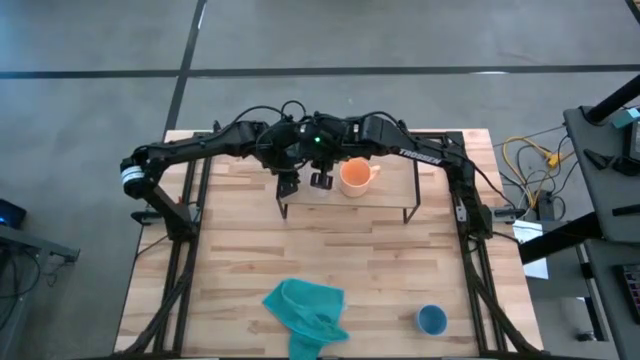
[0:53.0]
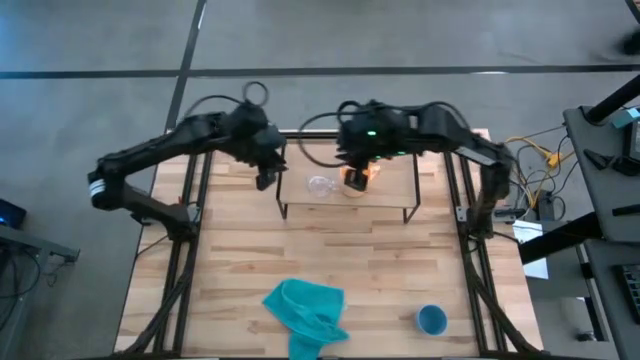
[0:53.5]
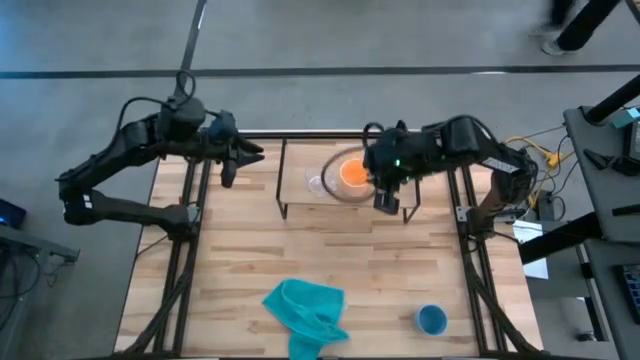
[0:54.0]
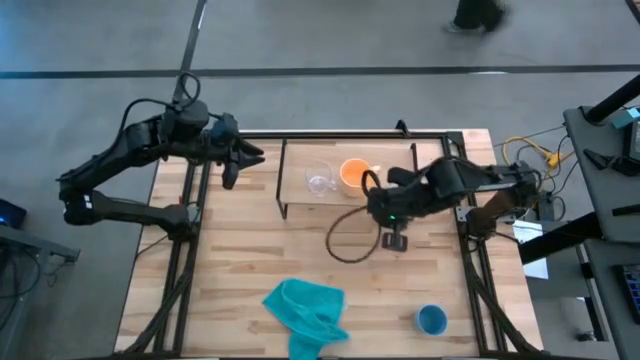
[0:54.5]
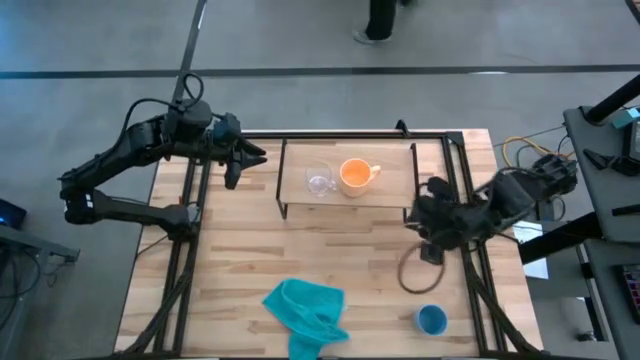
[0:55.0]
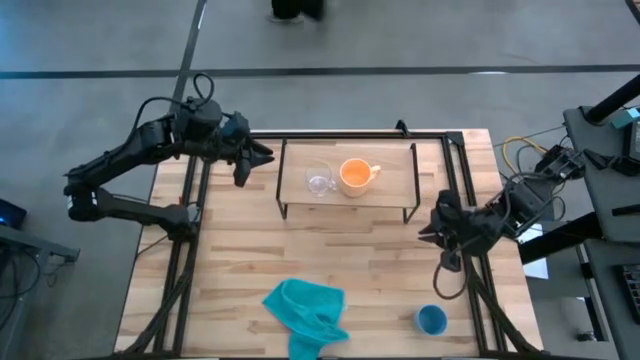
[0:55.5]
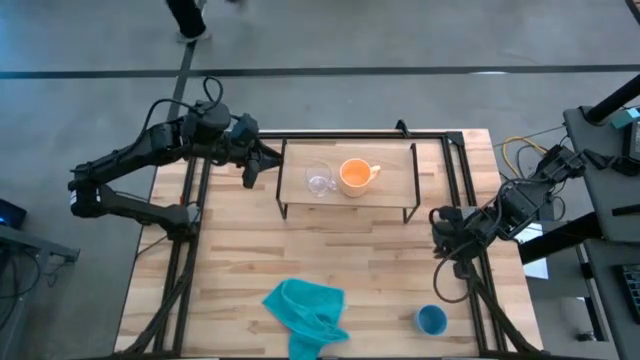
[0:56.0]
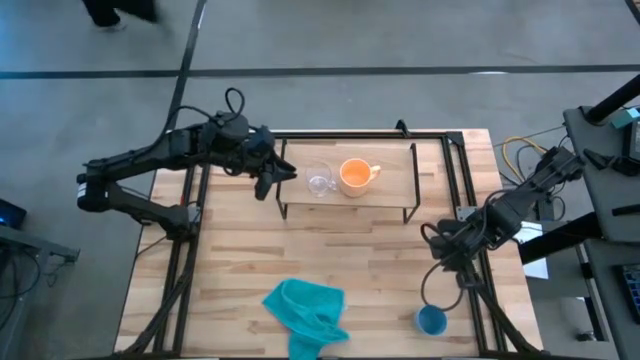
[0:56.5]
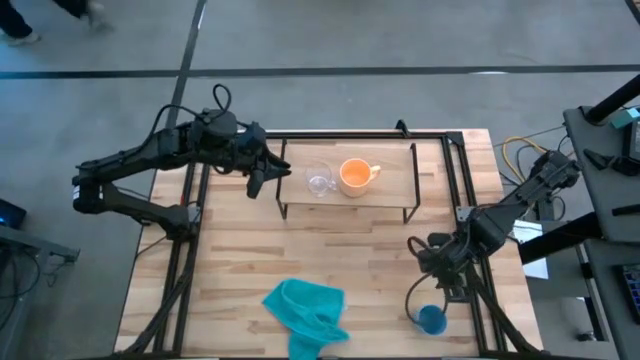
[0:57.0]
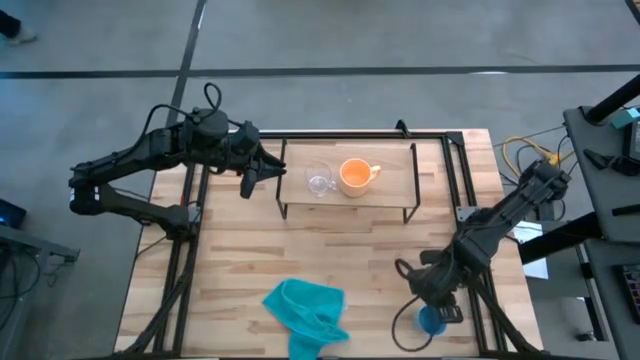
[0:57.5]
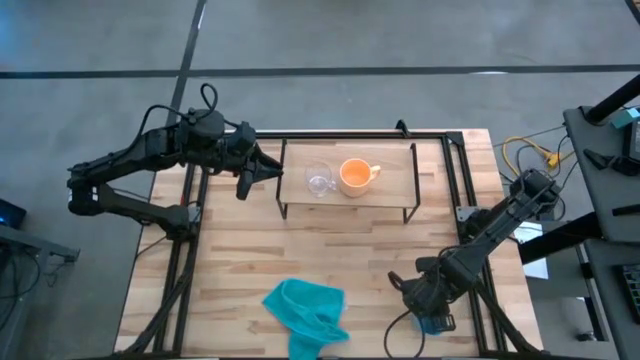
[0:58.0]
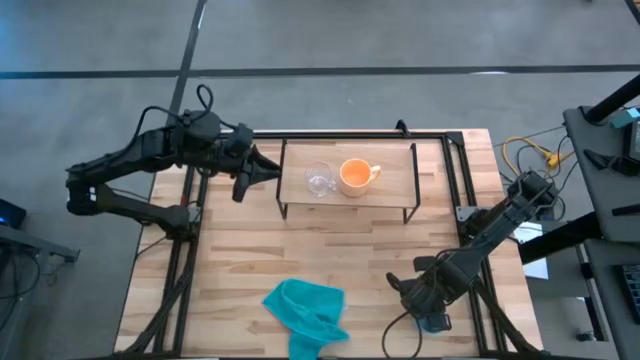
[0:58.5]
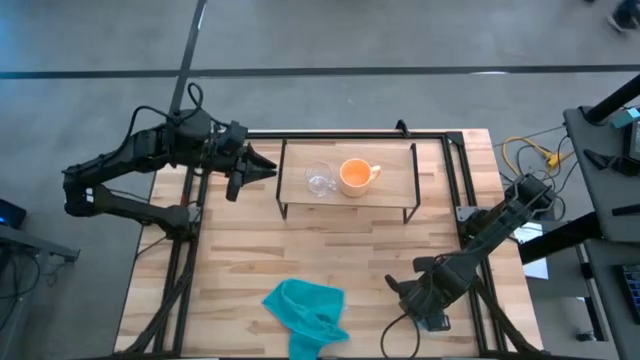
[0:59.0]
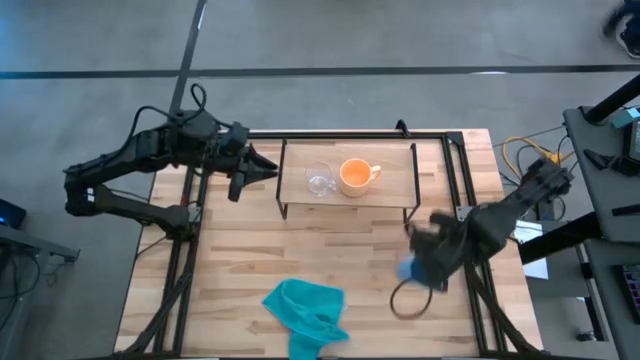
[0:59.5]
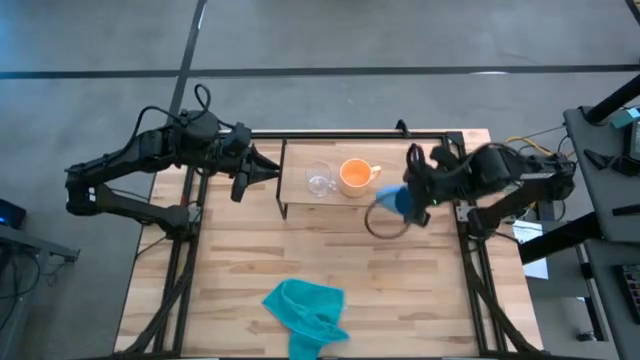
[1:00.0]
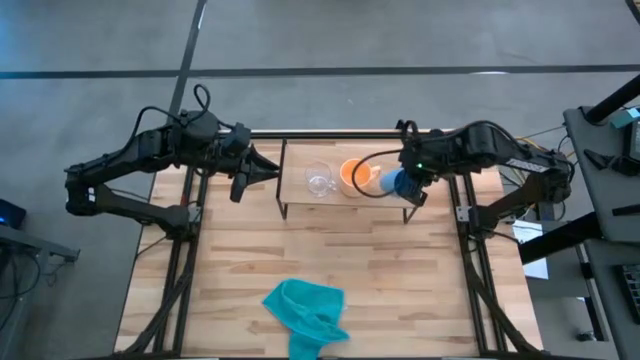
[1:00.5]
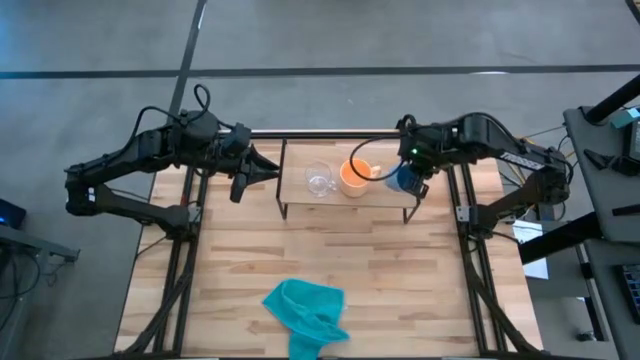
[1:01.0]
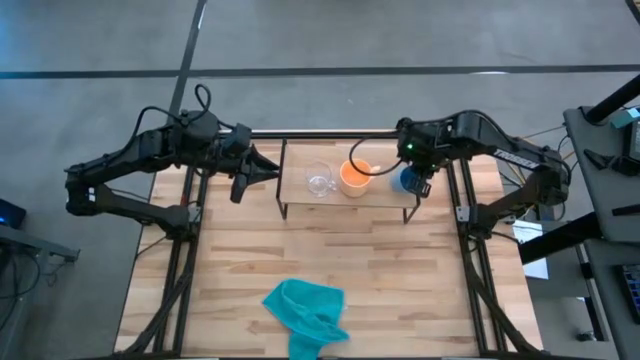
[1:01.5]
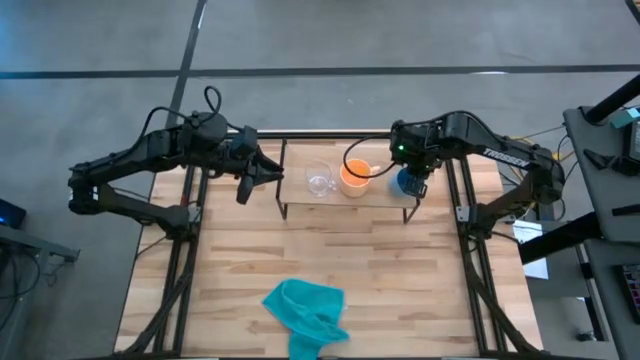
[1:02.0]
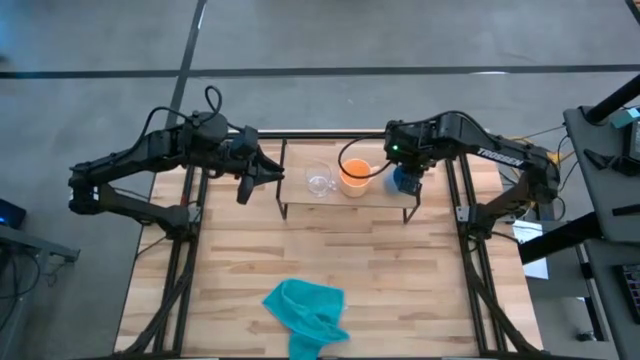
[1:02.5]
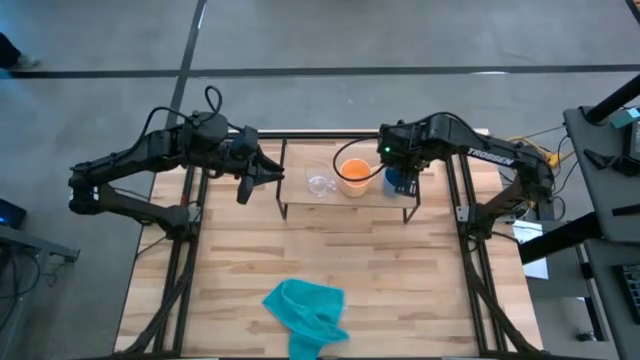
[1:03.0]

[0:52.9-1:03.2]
Task: Stack small to large cups/mugs on shelf
Put the blue cup on the shelf

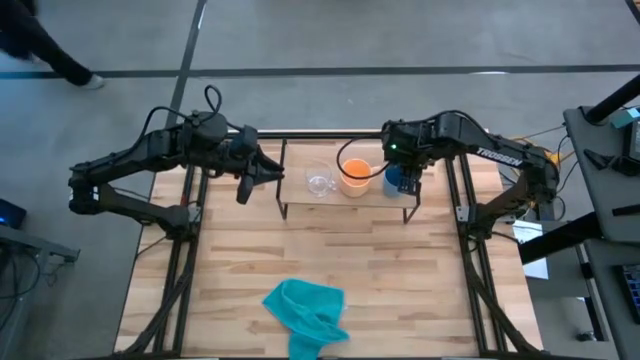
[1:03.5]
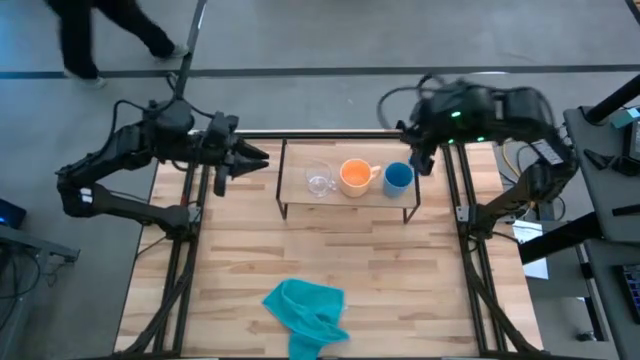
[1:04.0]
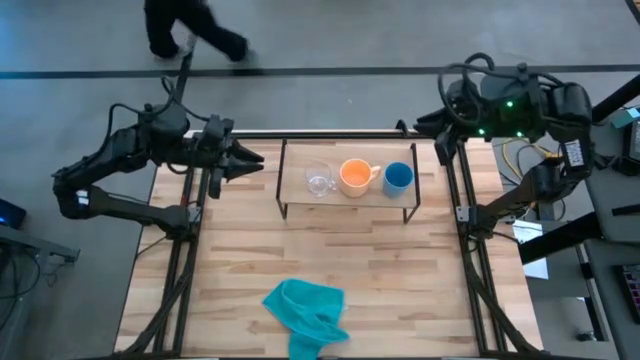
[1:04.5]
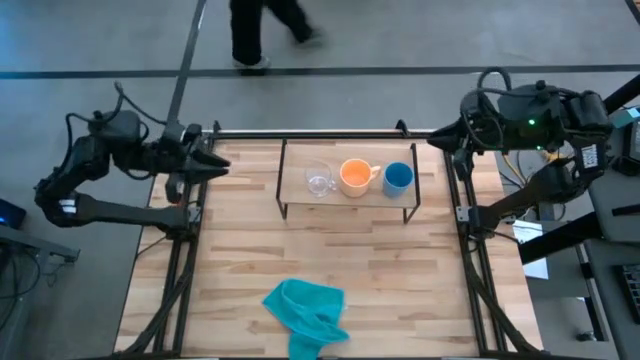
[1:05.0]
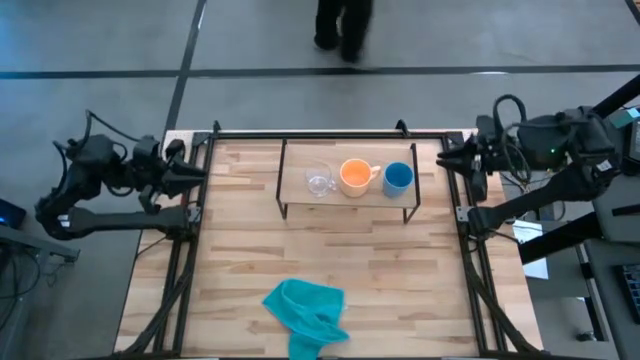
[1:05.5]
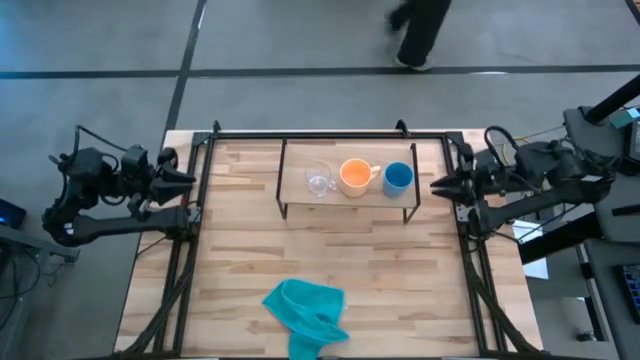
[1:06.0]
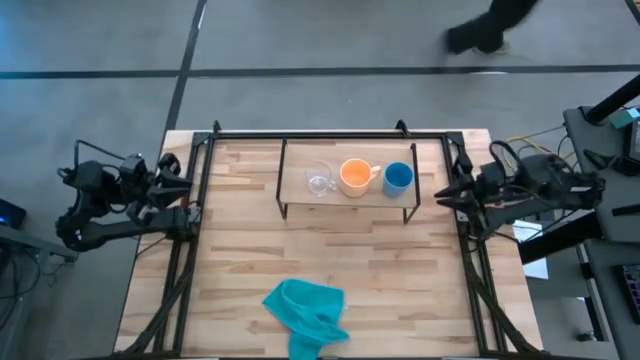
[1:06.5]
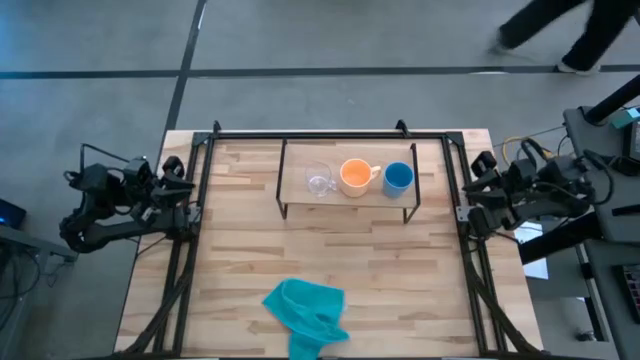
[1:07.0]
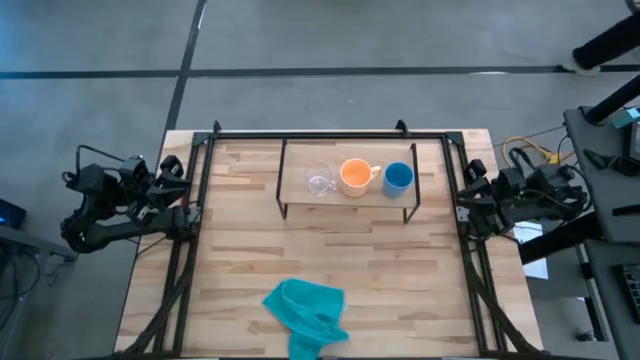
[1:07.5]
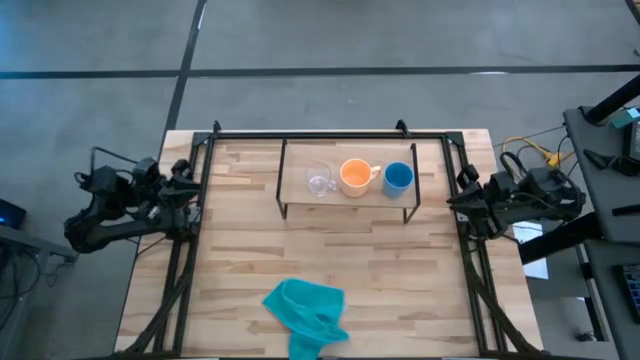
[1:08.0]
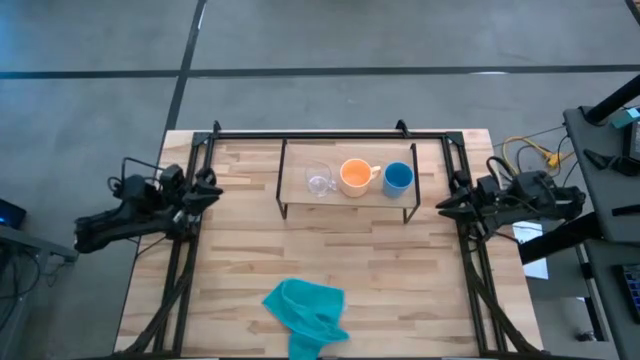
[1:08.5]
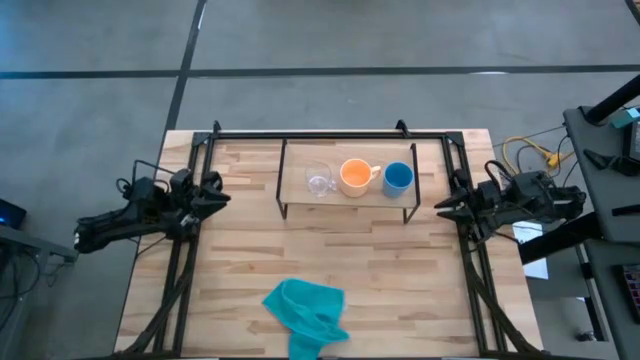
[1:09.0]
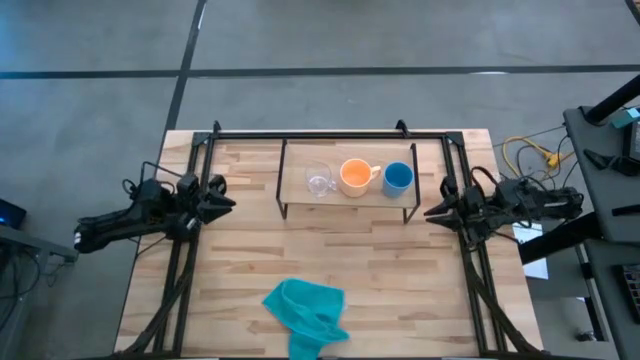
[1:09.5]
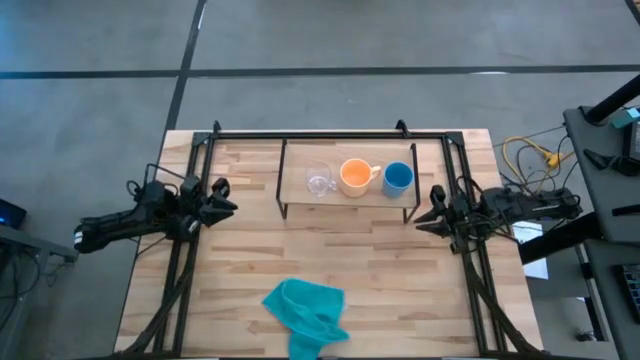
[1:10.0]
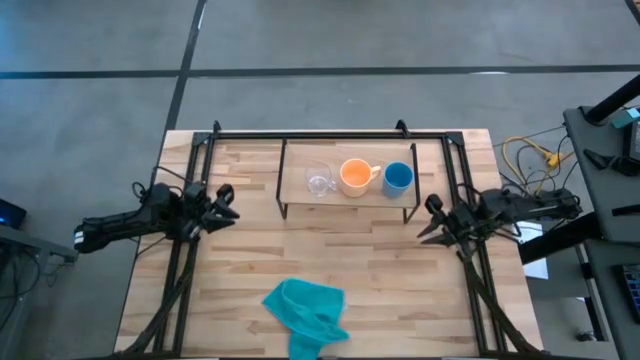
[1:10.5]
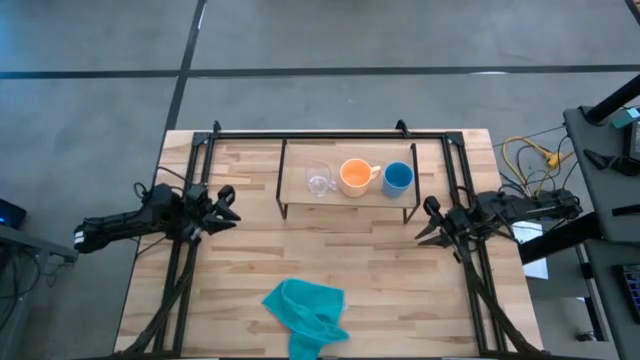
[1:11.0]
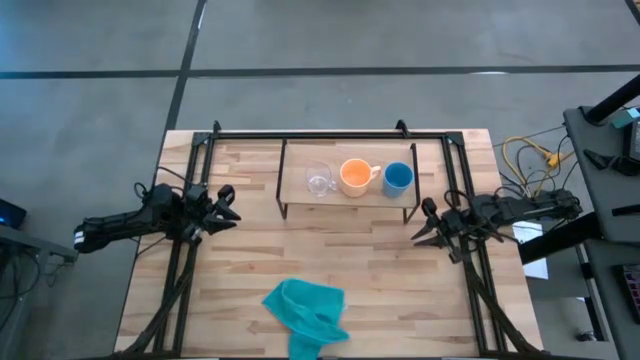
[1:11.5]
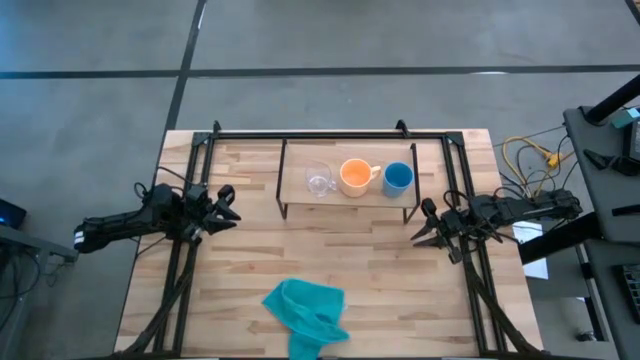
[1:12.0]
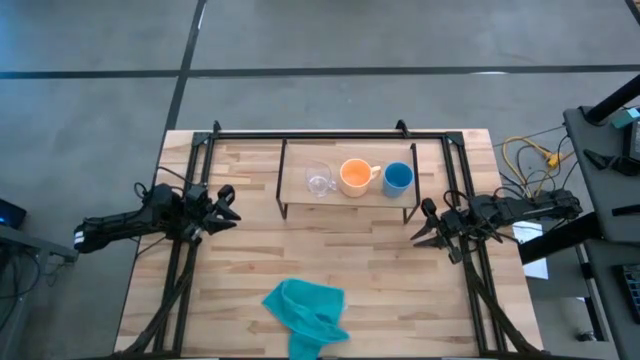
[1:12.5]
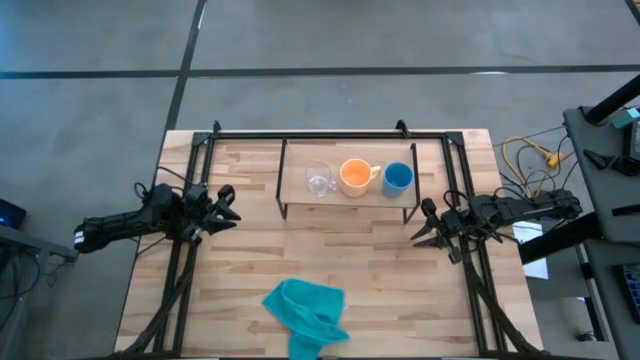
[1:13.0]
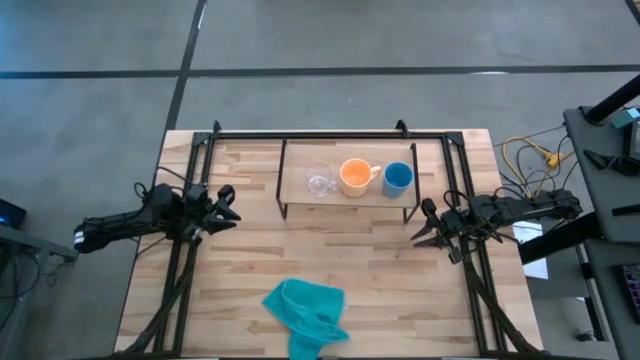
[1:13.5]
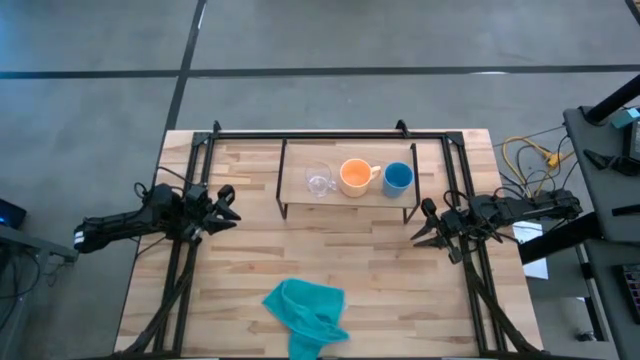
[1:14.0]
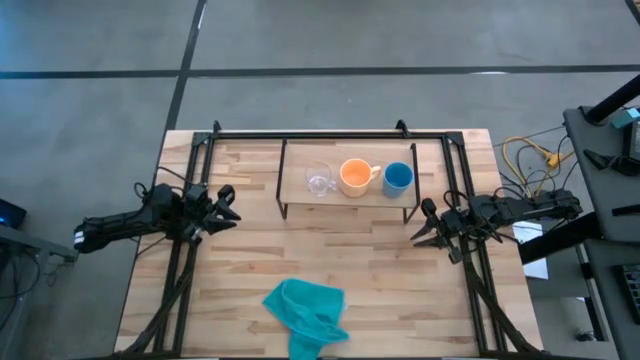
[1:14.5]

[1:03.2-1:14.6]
Return to Home Position
